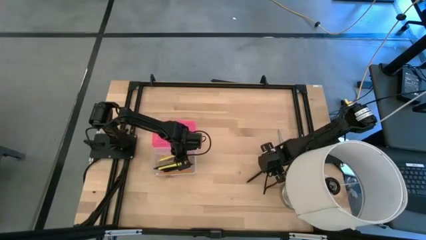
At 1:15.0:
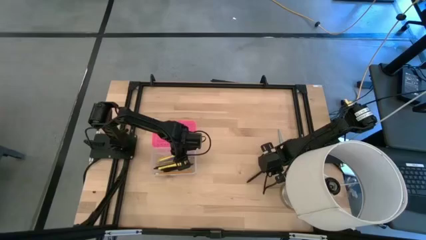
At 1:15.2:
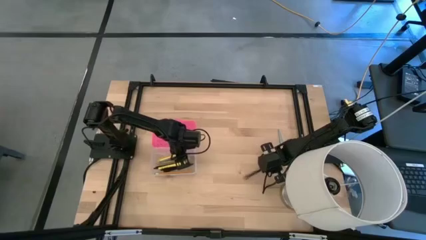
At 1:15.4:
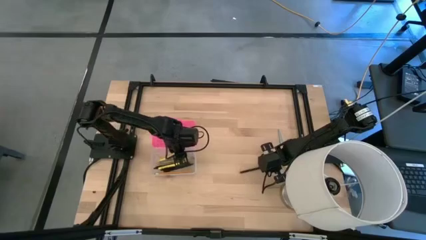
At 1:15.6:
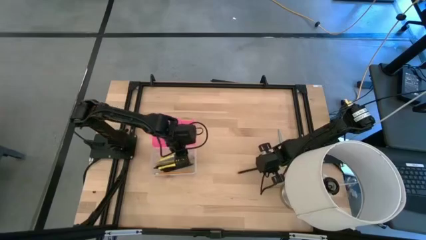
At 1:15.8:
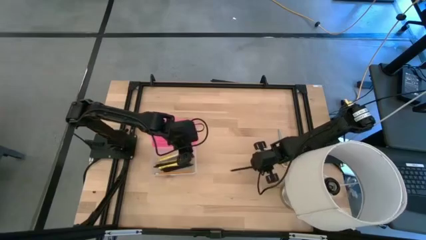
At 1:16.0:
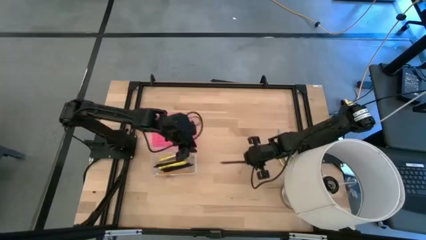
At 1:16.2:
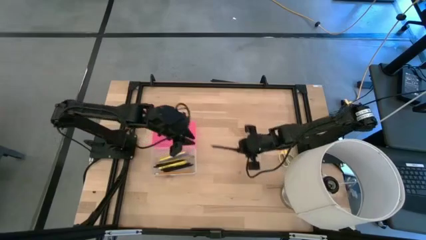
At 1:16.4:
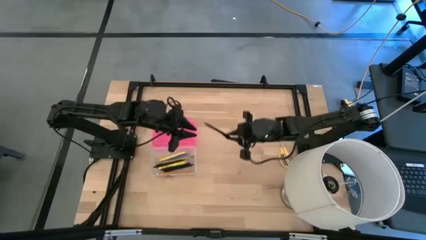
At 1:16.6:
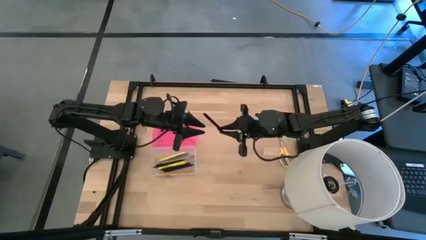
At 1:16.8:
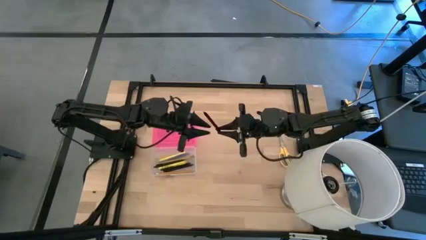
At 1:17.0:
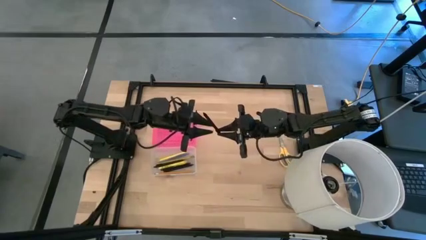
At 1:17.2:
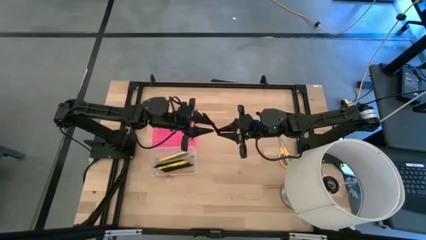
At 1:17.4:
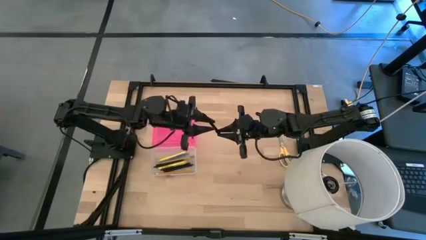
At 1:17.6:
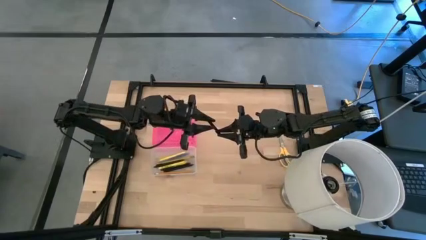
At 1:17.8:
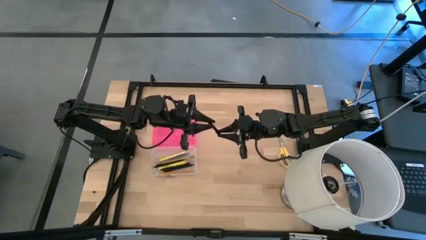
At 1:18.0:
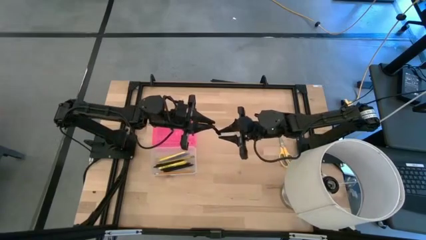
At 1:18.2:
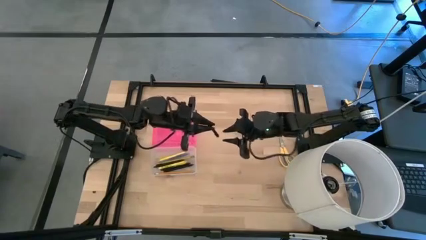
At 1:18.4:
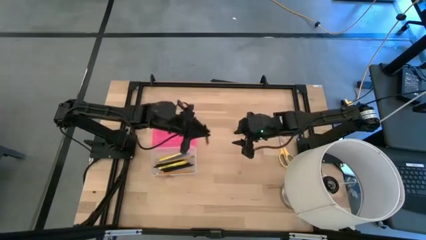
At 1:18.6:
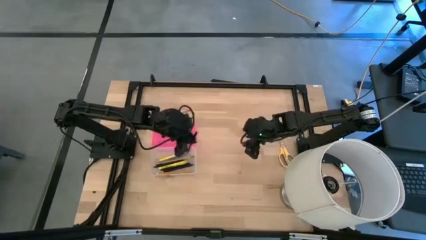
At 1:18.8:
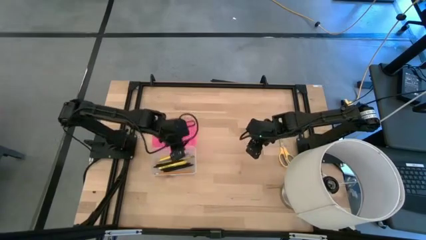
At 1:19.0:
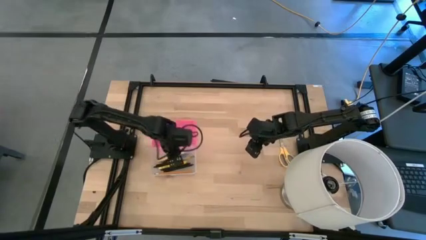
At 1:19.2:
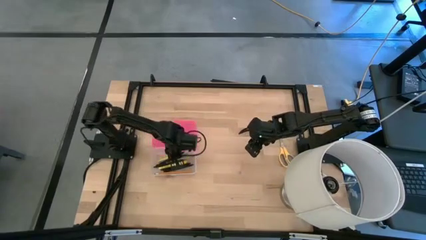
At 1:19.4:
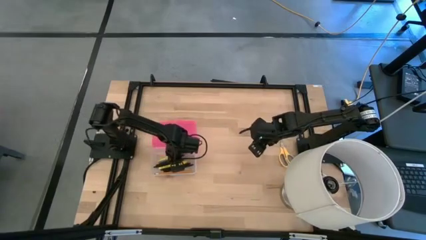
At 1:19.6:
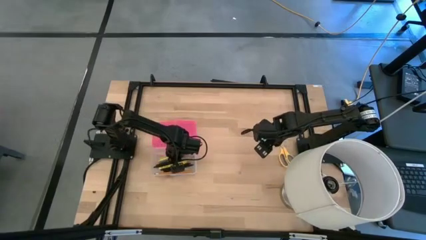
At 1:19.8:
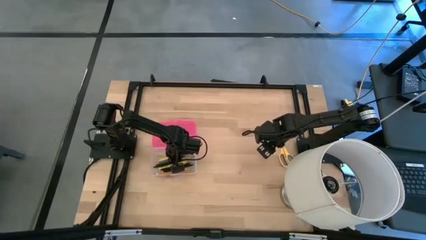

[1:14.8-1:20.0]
Task: Pick & place school supplies into a supply box
Put the black pen into the pink supply box

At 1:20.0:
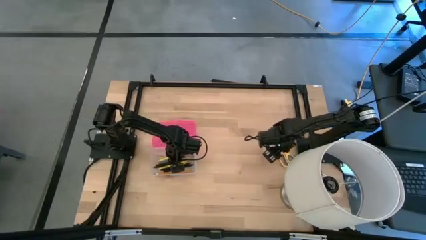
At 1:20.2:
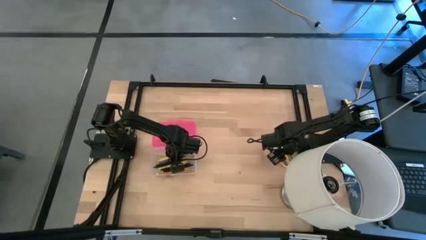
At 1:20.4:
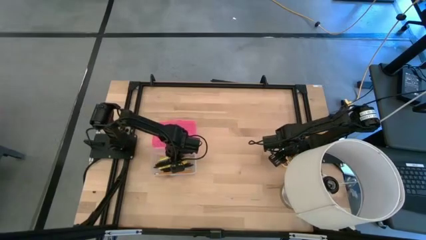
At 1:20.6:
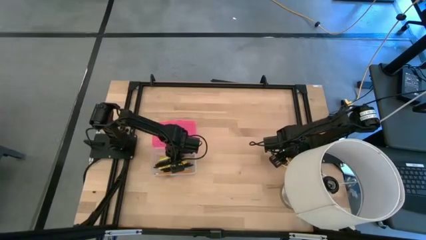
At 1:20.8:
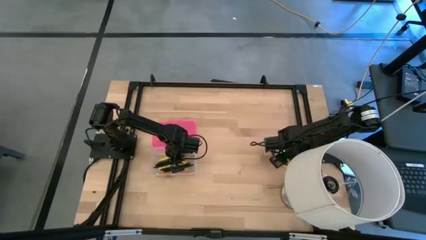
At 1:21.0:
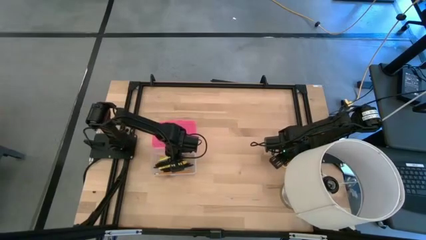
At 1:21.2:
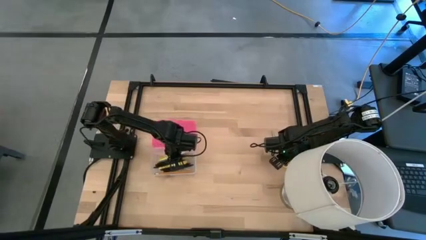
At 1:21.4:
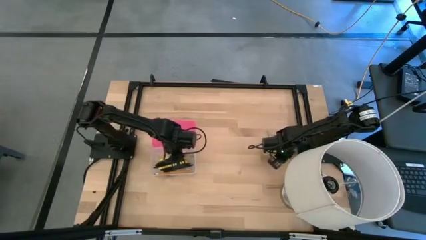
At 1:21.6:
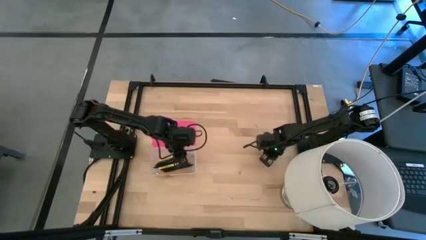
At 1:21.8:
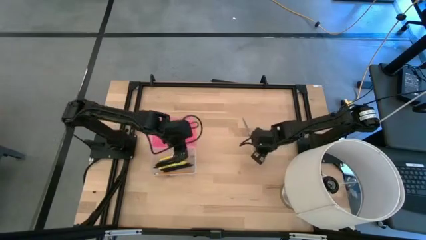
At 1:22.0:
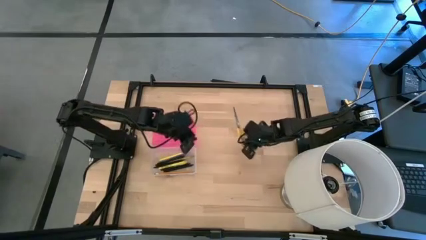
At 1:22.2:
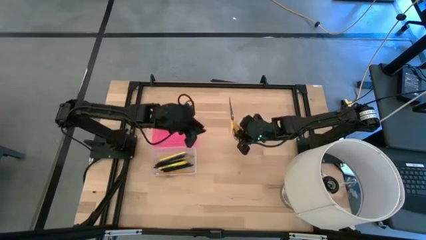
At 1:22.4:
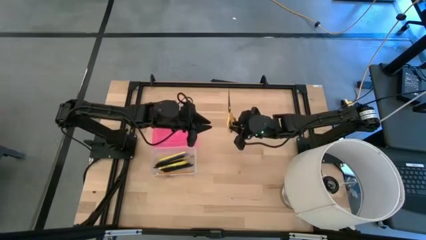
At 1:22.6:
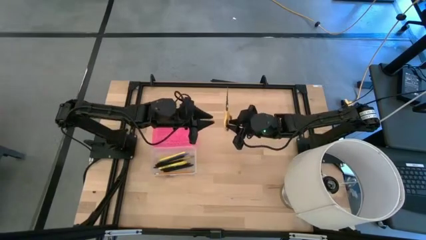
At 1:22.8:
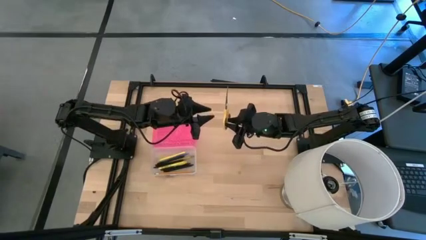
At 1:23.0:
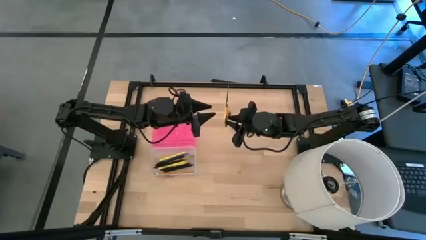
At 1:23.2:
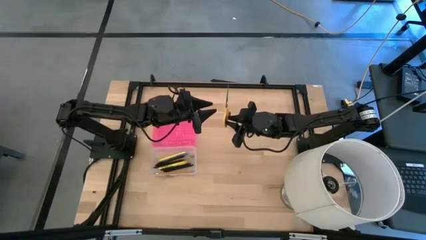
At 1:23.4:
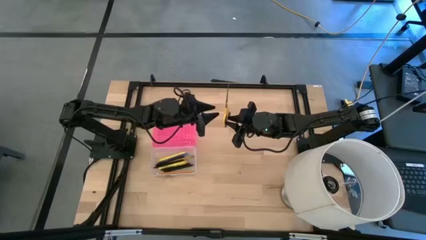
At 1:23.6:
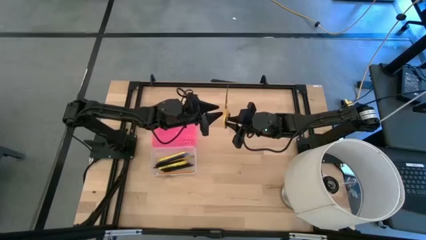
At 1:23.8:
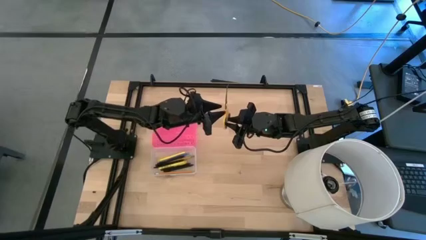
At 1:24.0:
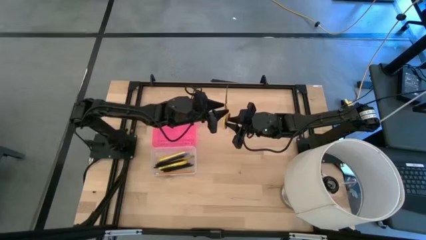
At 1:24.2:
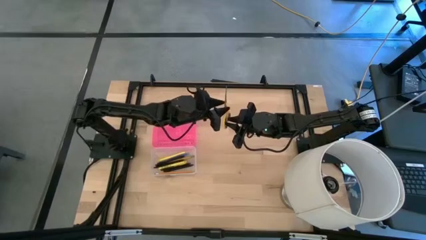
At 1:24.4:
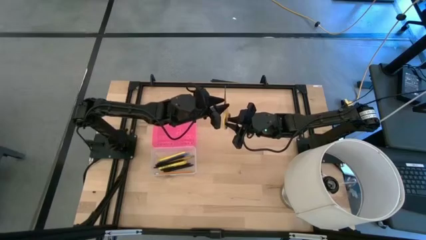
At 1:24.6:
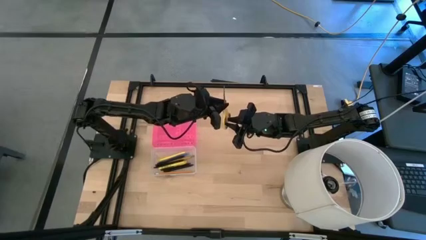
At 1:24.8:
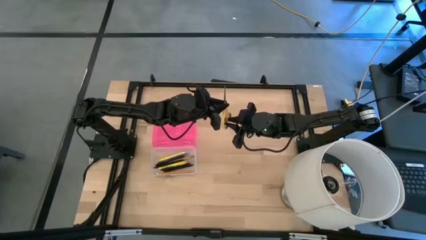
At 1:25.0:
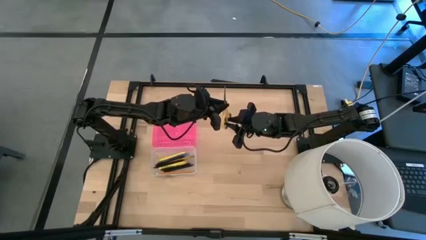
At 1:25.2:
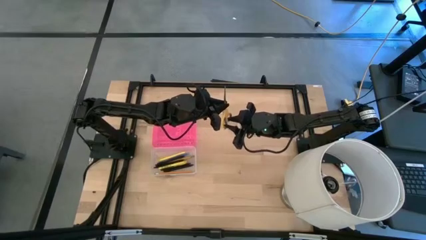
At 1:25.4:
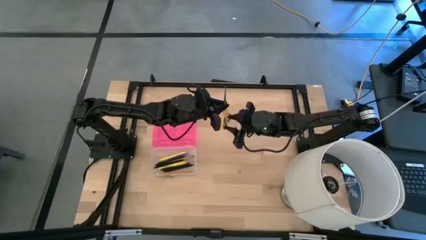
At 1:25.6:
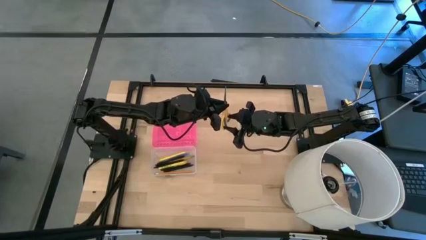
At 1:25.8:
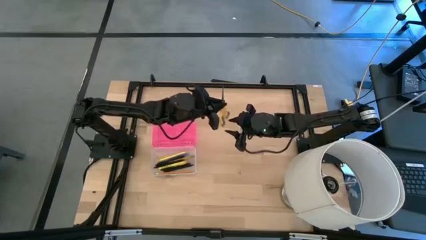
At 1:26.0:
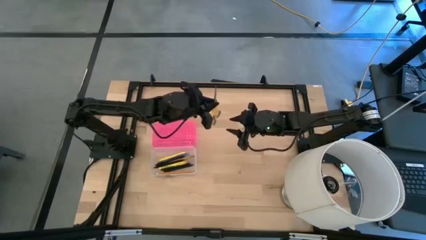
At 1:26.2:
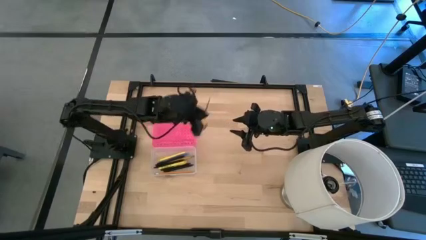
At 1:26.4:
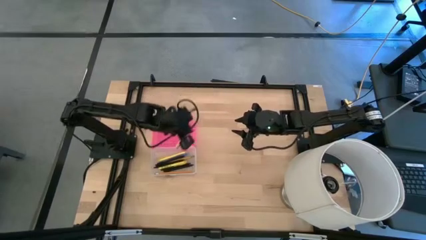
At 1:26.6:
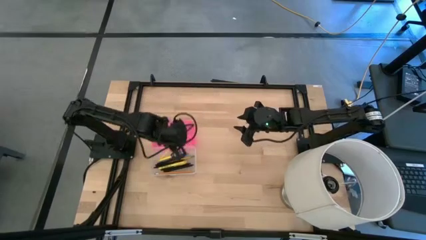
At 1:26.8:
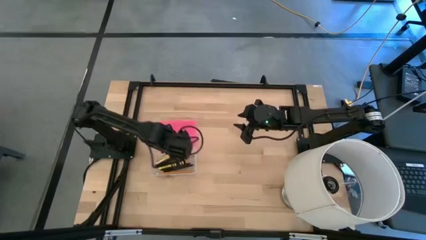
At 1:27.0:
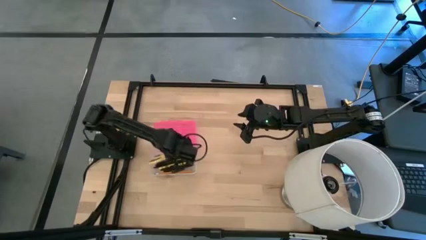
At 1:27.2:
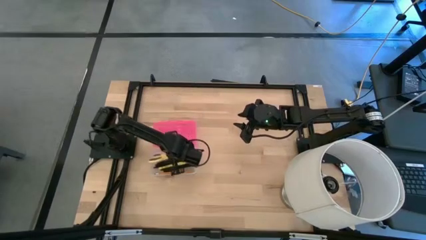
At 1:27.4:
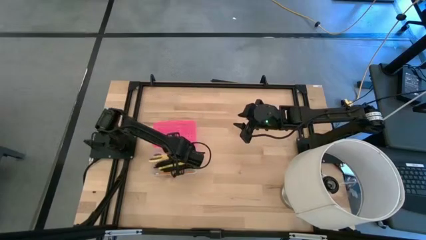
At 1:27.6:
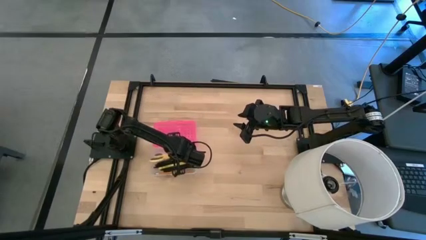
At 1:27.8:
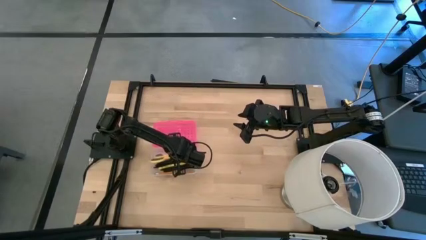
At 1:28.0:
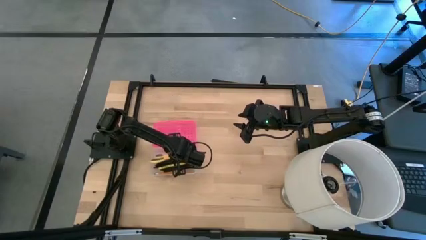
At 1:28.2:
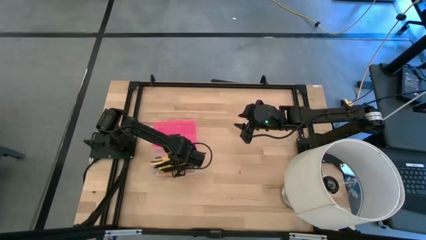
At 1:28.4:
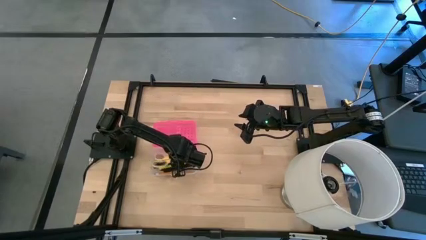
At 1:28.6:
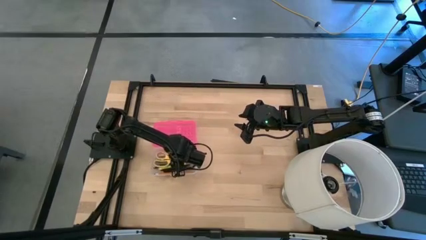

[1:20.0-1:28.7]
Put the yellow scissors into the pink supply box
